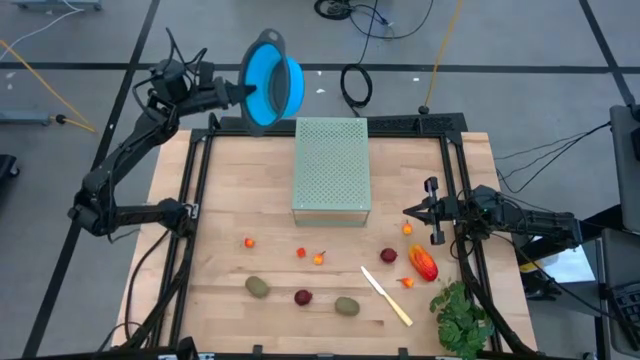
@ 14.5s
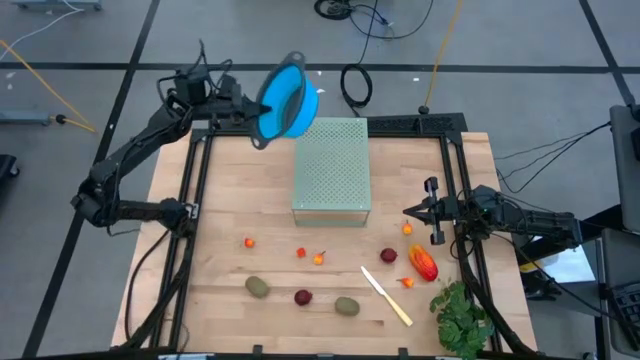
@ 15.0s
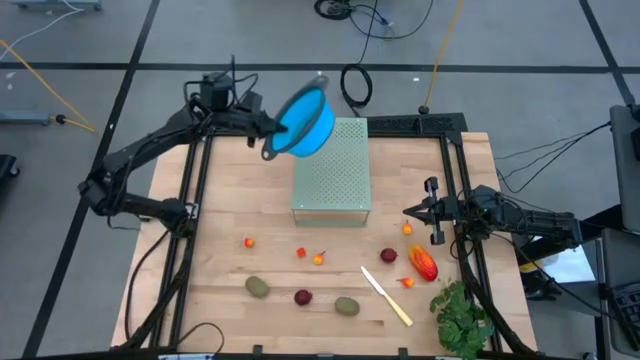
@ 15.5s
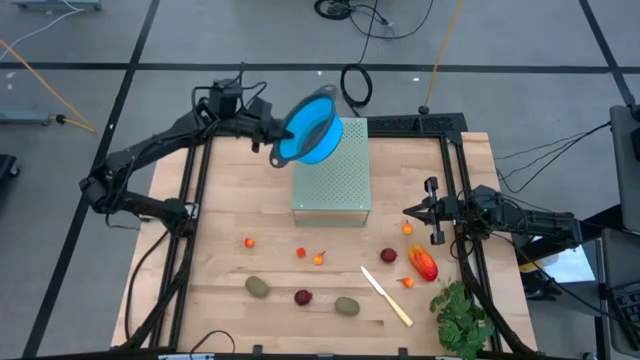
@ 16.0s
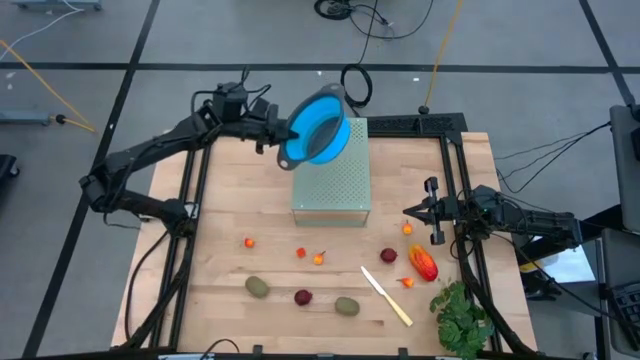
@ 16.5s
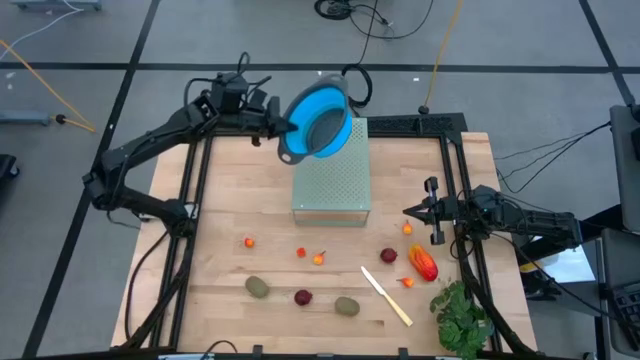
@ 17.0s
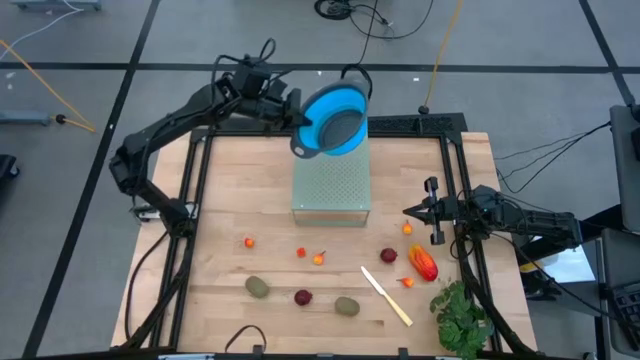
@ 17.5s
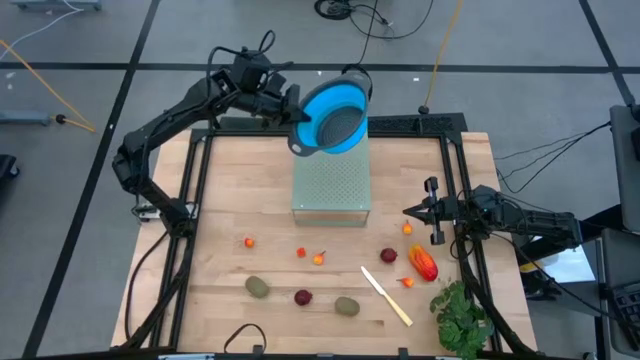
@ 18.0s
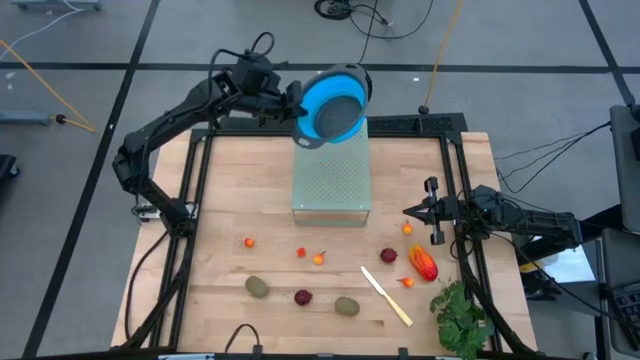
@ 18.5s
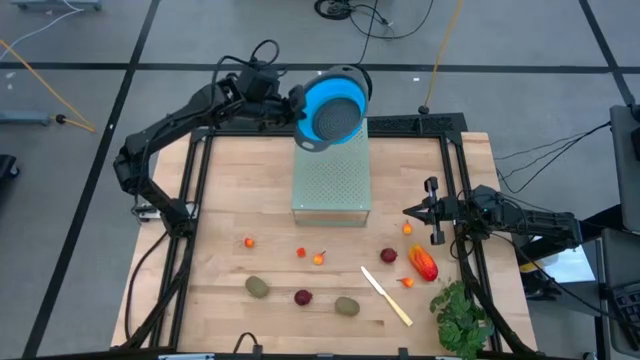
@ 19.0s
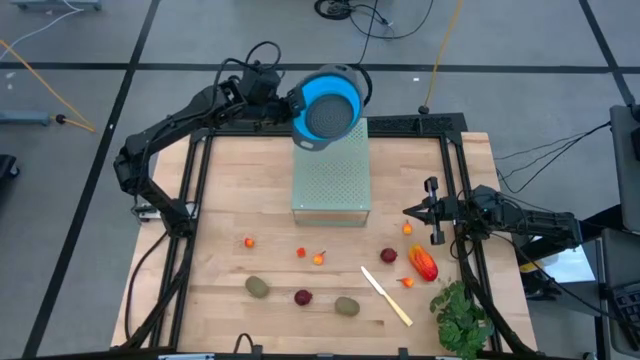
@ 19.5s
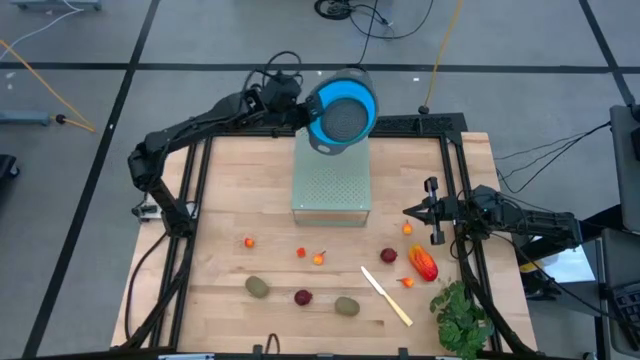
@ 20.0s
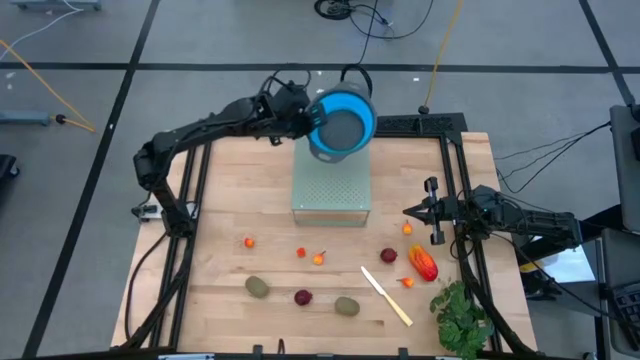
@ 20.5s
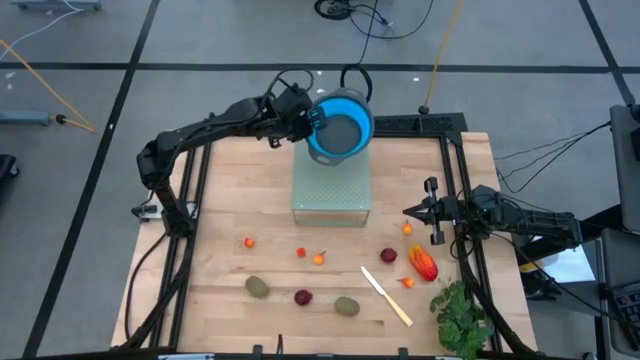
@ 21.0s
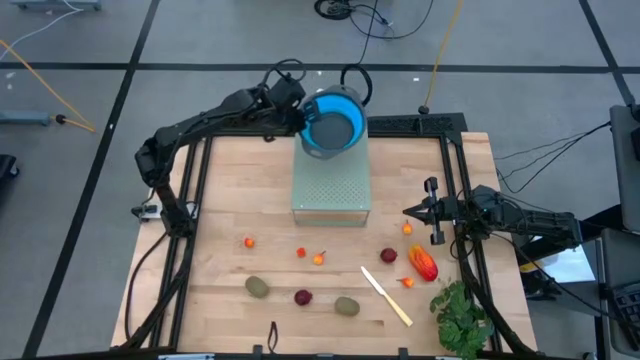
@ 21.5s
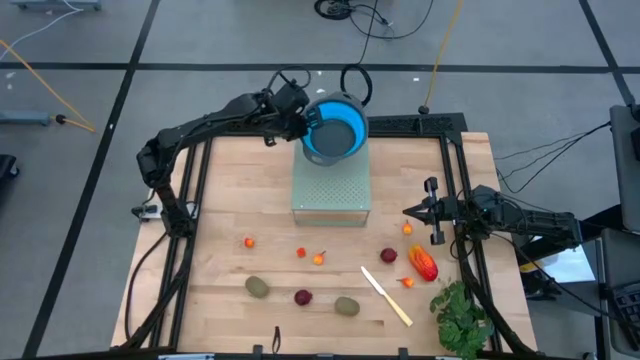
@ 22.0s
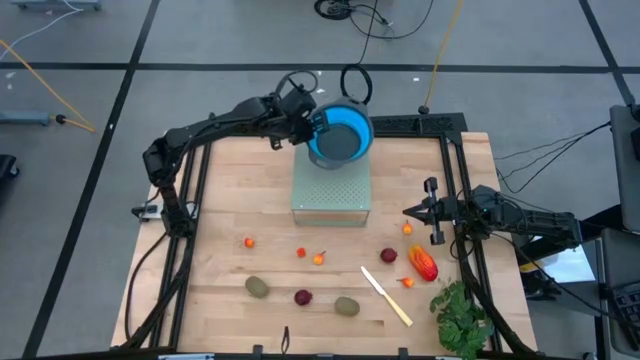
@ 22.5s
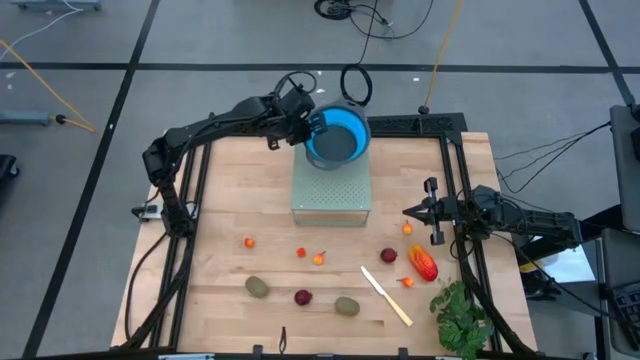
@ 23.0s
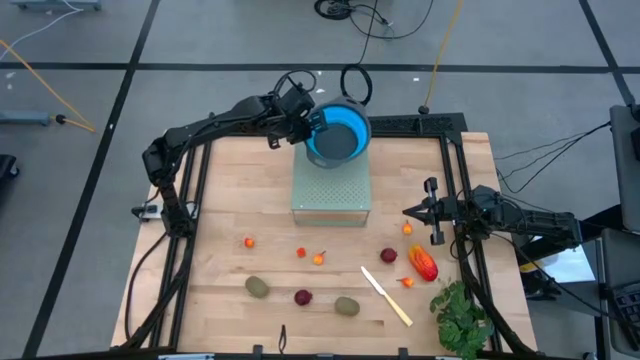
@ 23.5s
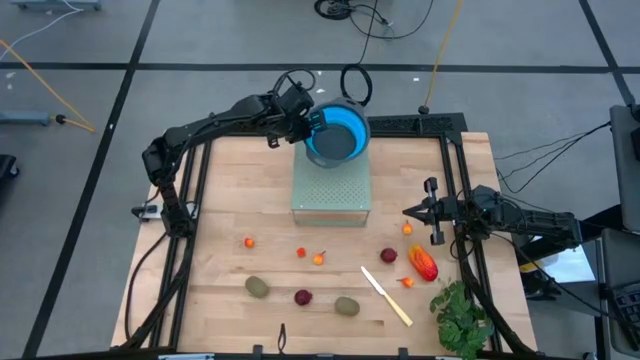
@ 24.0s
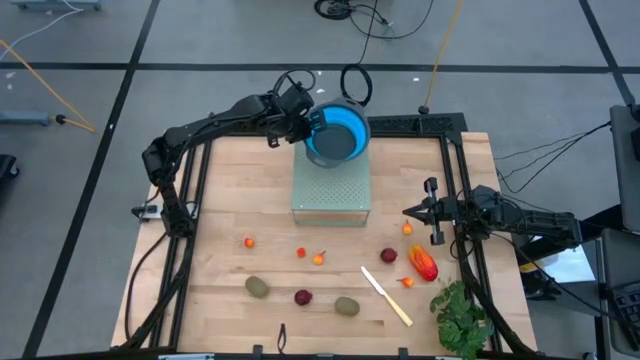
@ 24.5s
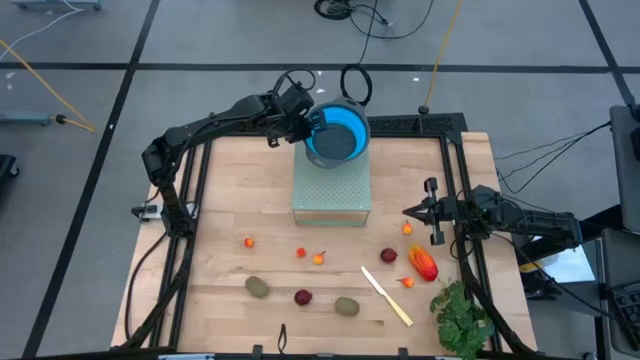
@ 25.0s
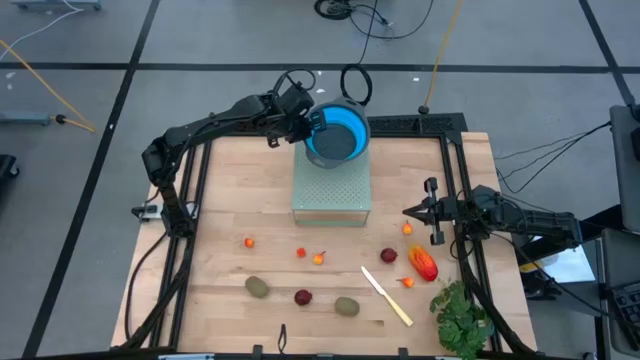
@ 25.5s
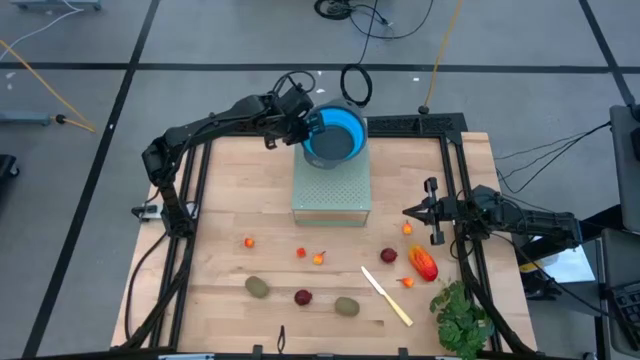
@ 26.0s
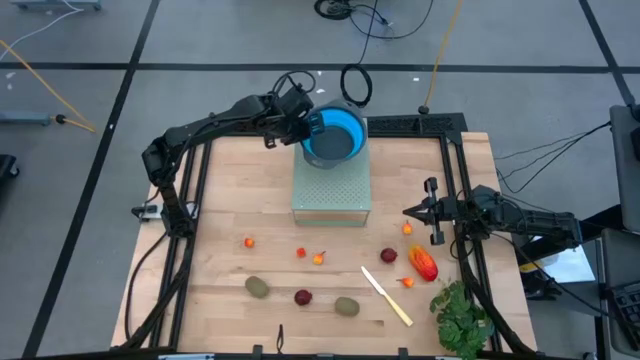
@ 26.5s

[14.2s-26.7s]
Task: Pick & Place Fruit
Put the blue strainer bowl on the shelf

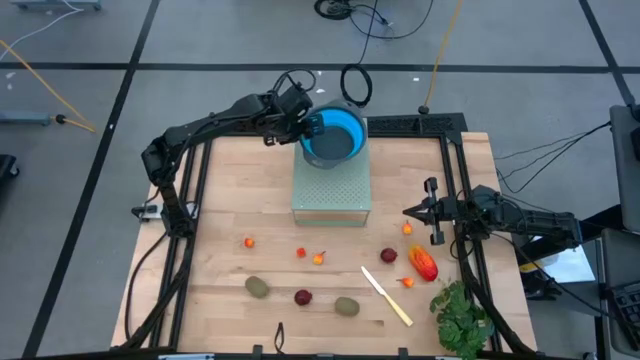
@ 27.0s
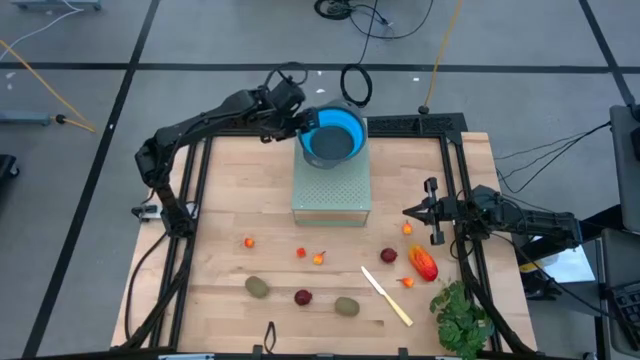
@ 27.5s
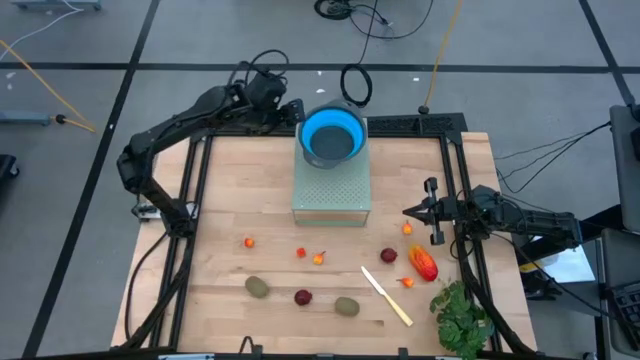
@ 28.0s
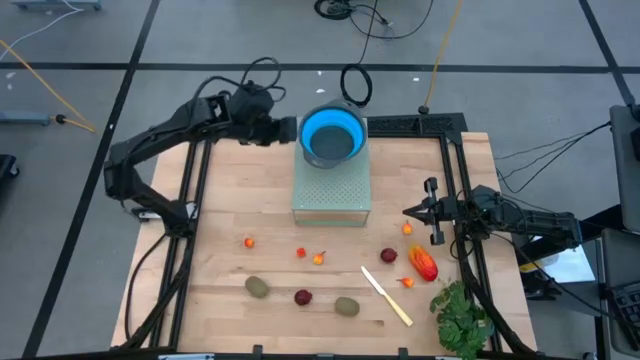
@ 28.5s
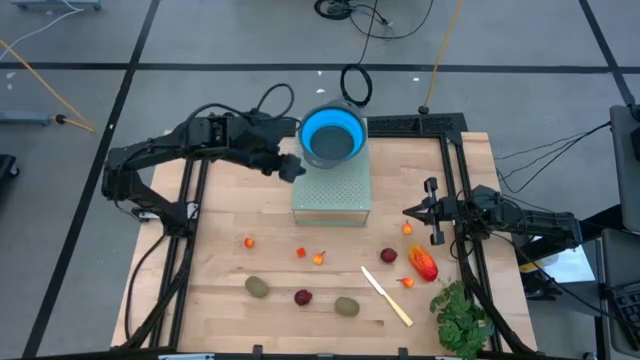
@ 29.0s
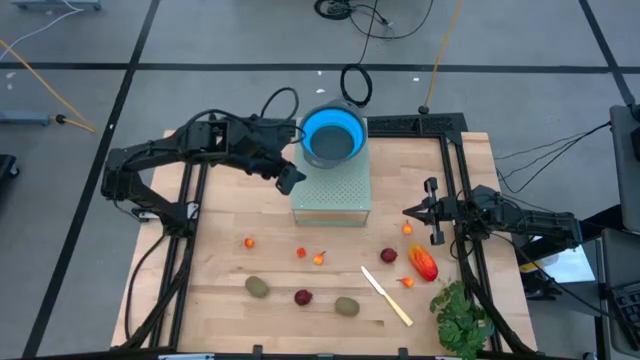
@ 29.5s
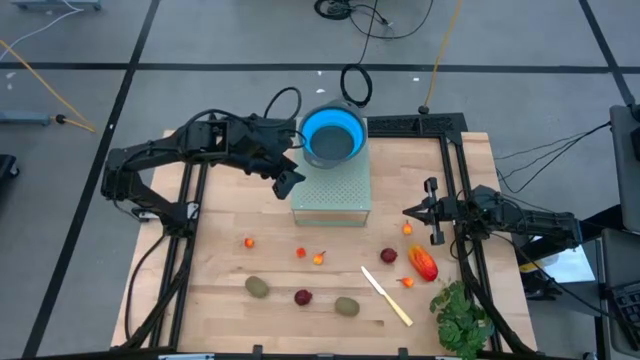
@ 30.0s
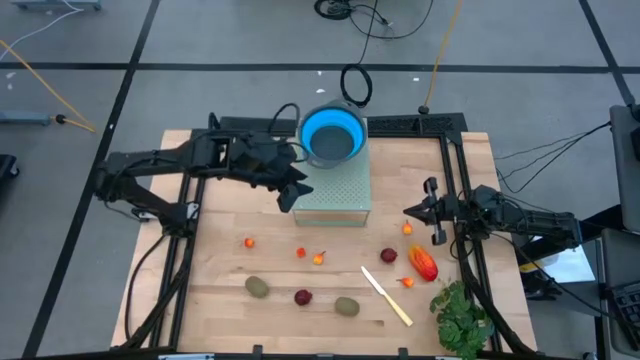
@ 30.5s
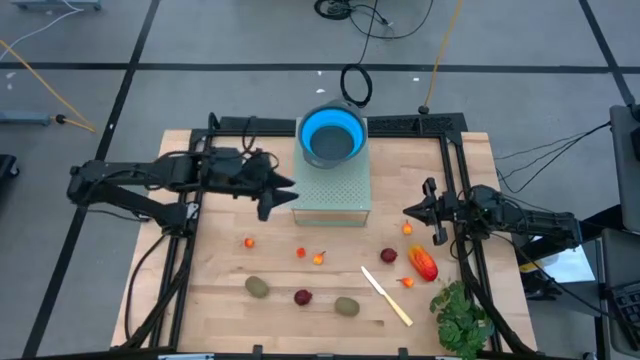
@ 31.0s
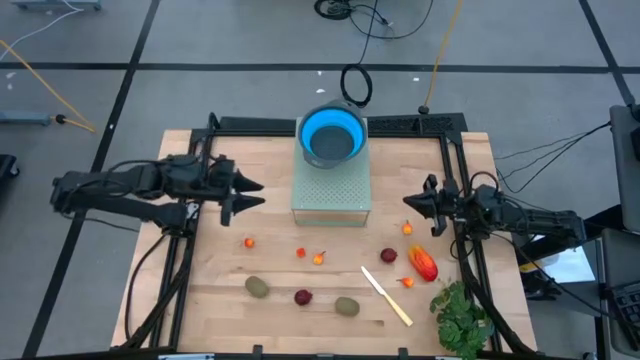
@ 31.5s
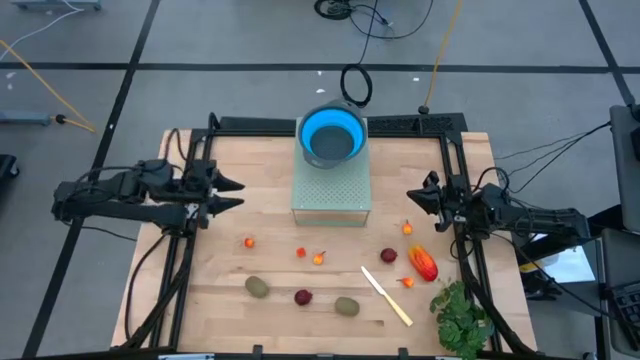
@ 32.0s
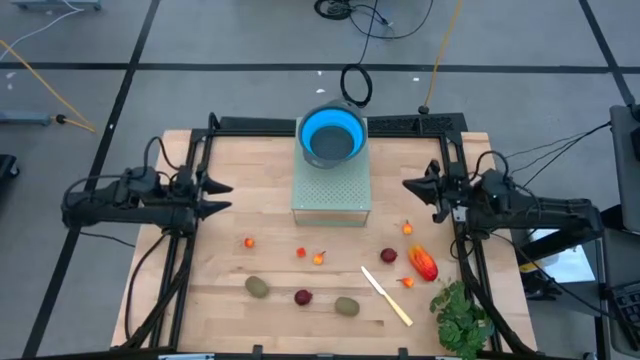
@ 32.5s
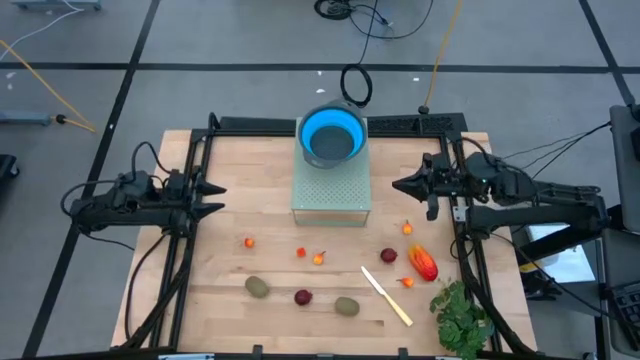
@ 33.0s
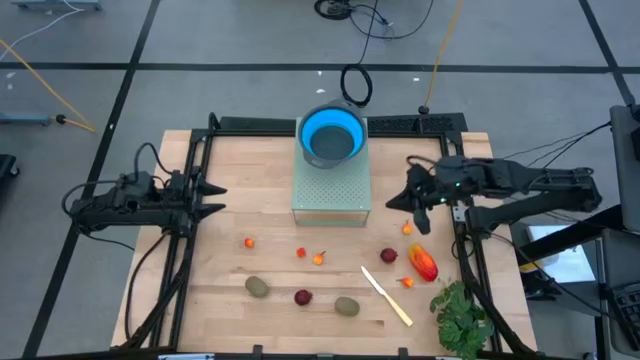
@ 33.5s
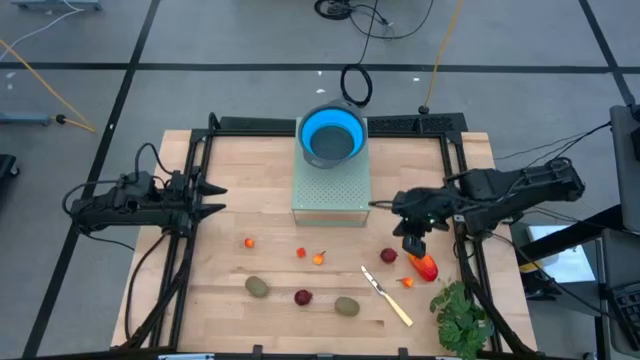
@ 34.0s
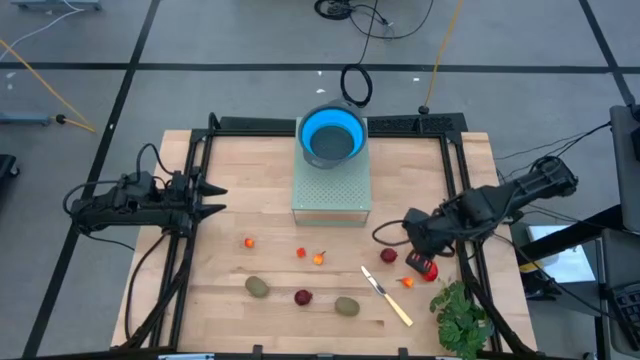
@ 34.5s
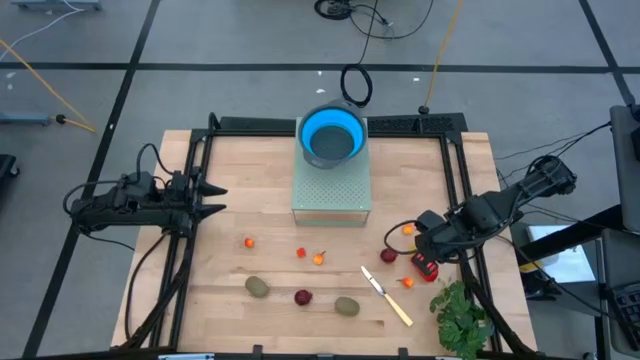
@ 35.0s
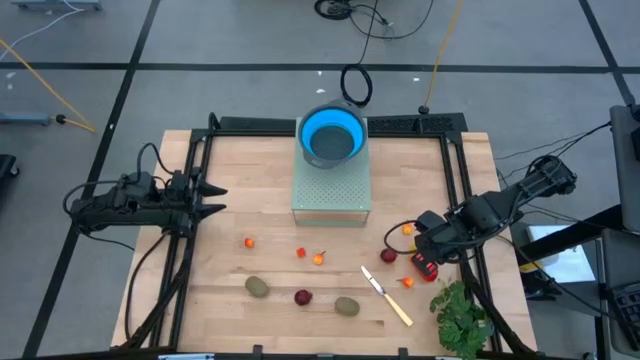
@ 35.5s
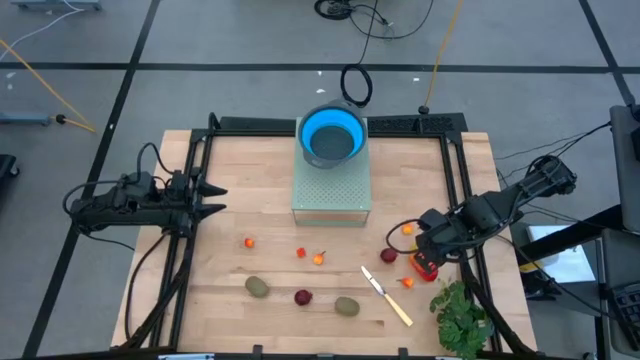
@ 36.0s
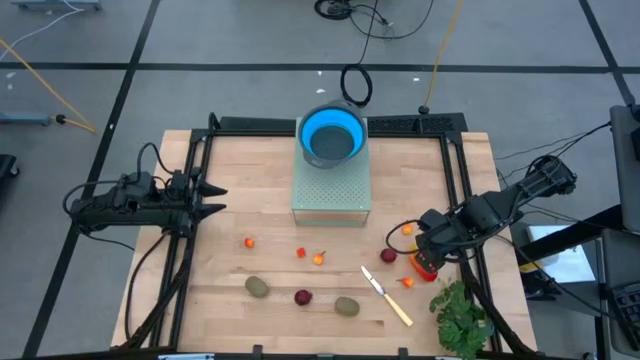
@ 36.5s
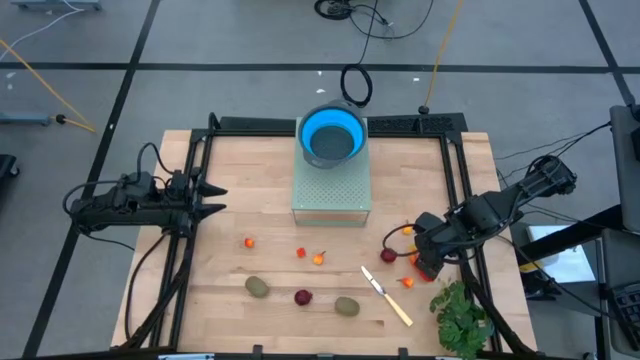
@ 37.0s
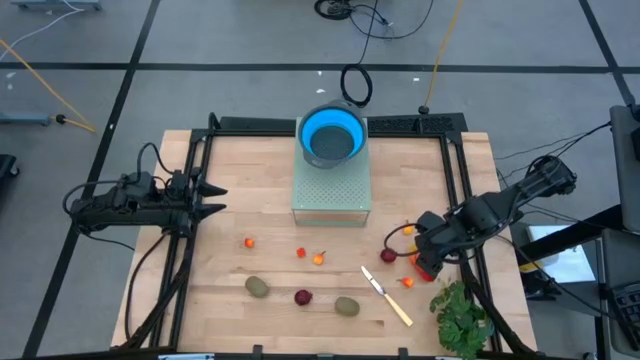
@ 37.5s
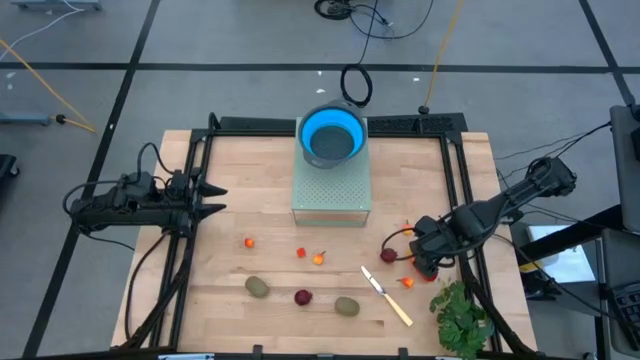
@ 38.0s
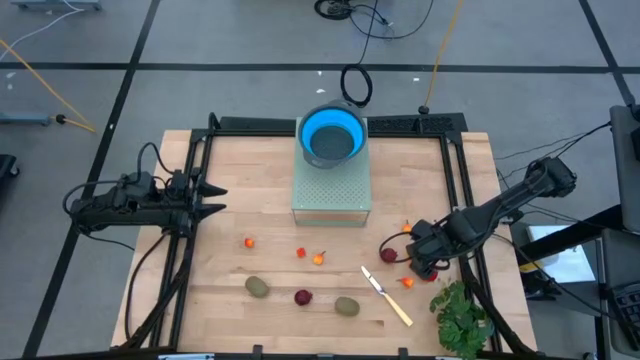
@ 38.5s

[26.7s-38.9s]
Put the yellow mango into the blue strainer bowl on the shelf
